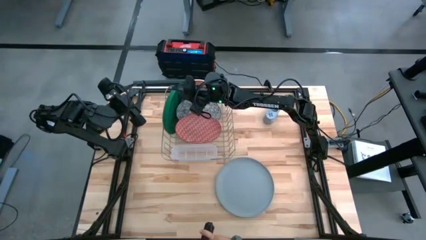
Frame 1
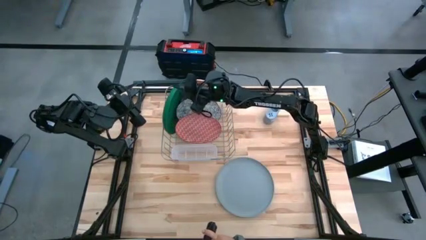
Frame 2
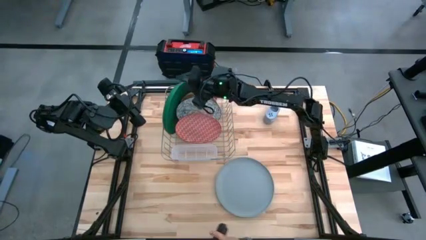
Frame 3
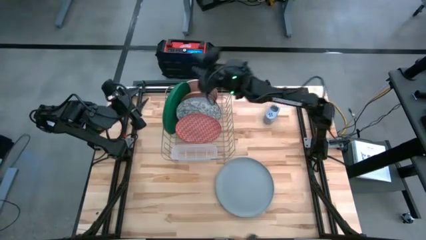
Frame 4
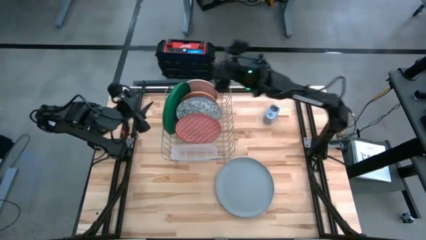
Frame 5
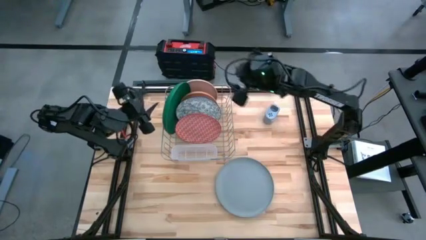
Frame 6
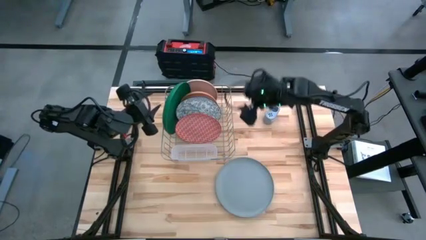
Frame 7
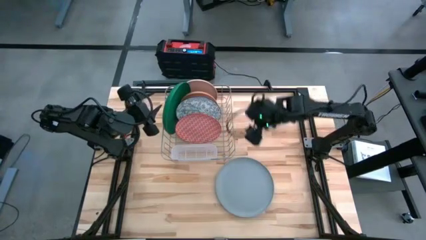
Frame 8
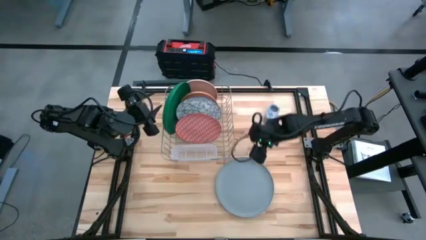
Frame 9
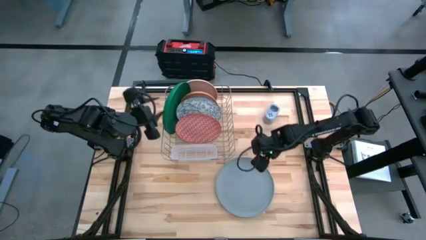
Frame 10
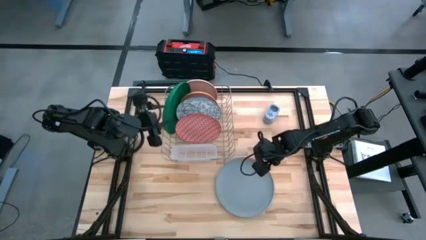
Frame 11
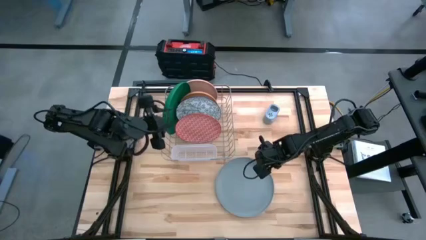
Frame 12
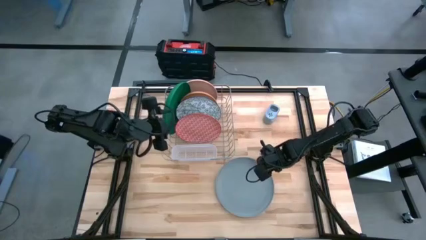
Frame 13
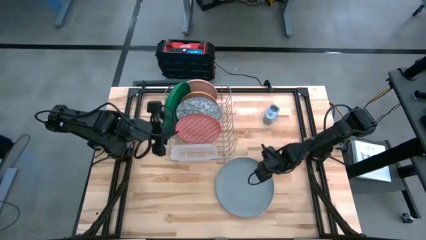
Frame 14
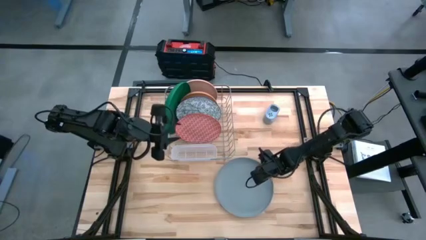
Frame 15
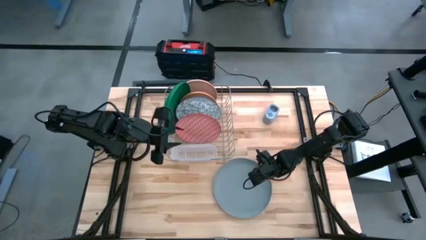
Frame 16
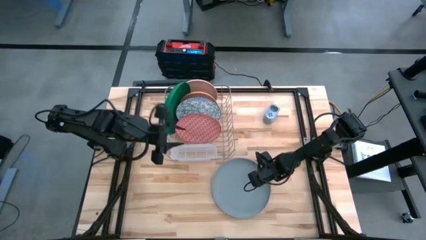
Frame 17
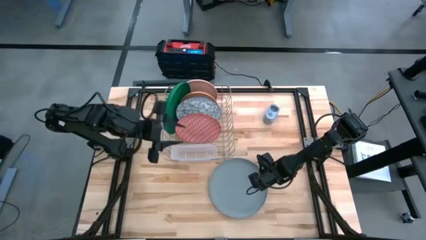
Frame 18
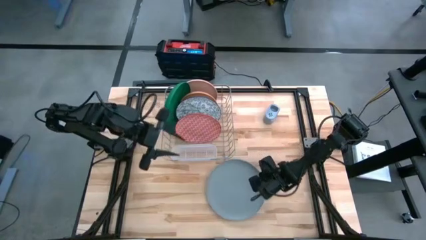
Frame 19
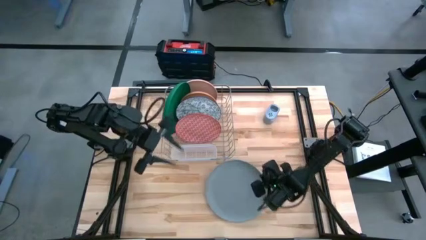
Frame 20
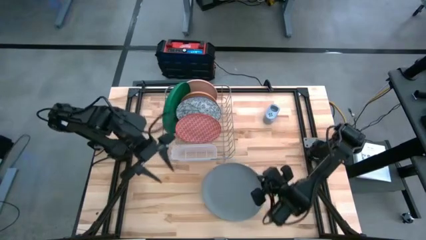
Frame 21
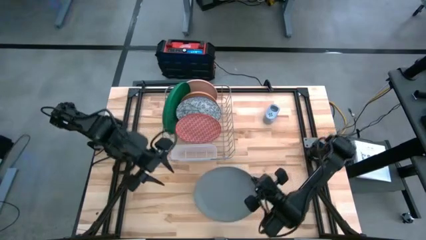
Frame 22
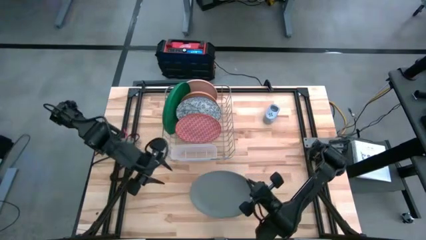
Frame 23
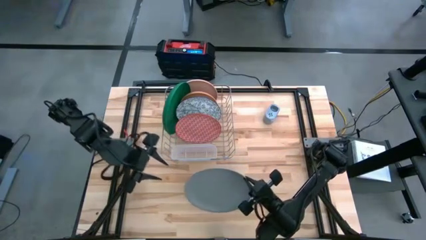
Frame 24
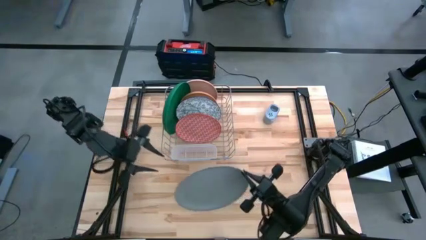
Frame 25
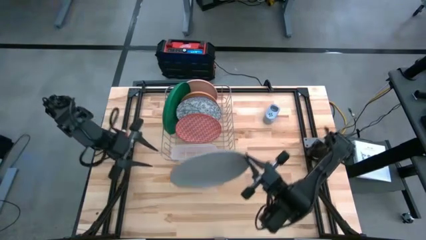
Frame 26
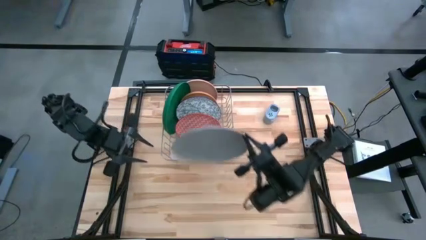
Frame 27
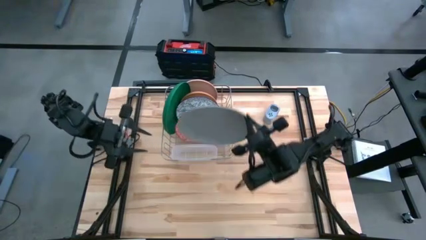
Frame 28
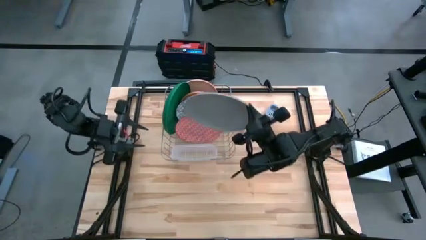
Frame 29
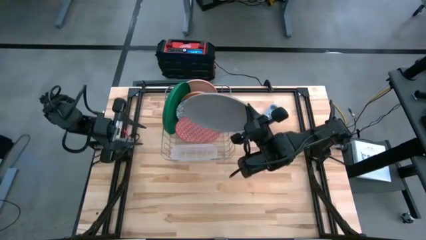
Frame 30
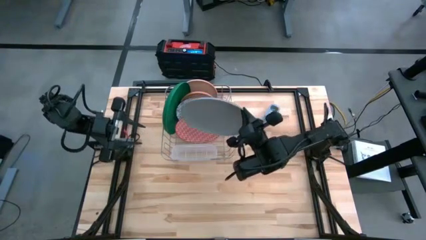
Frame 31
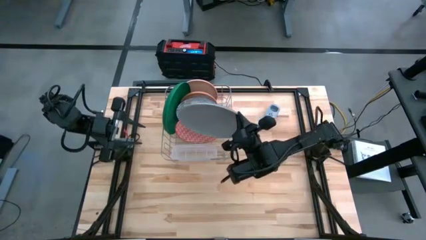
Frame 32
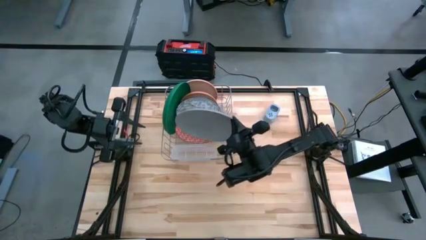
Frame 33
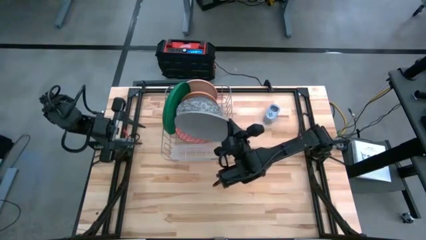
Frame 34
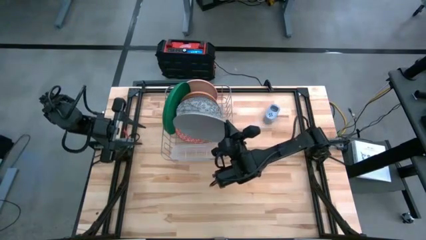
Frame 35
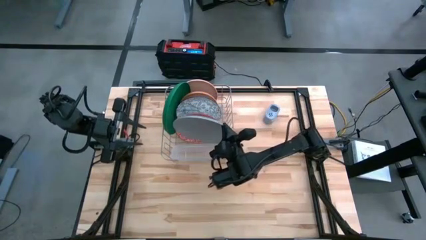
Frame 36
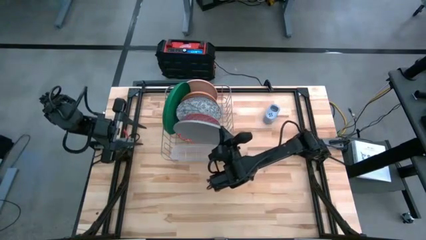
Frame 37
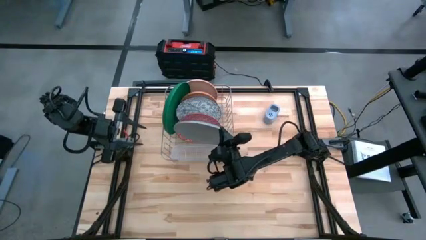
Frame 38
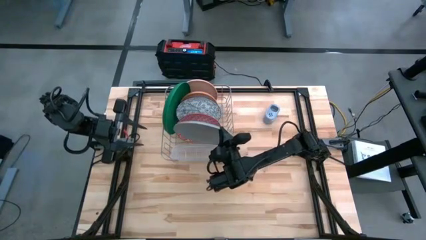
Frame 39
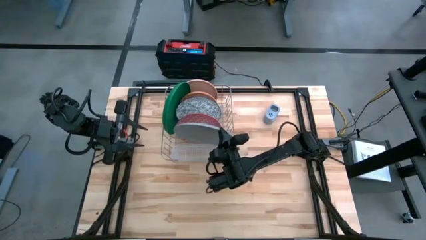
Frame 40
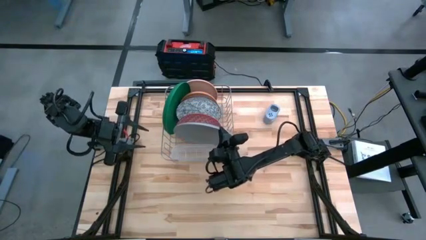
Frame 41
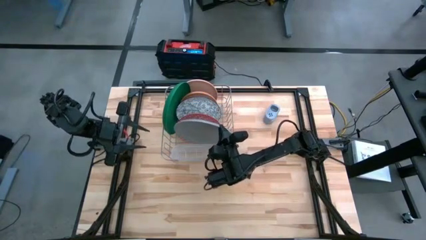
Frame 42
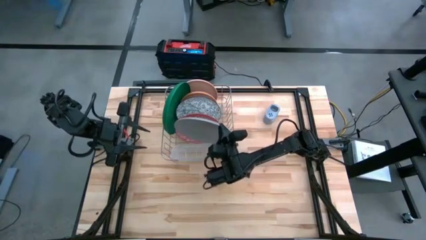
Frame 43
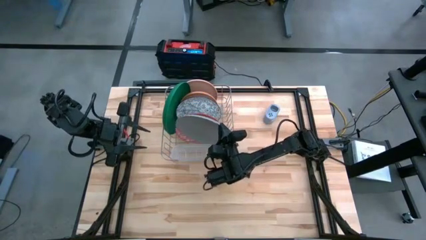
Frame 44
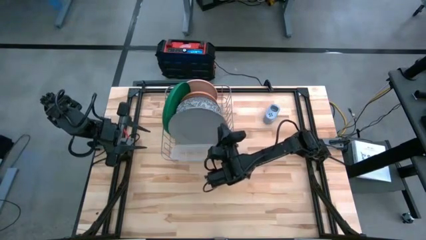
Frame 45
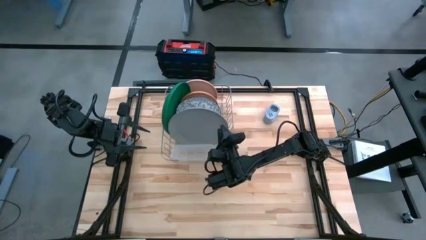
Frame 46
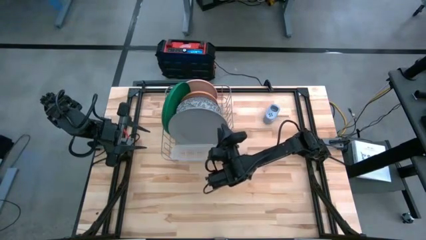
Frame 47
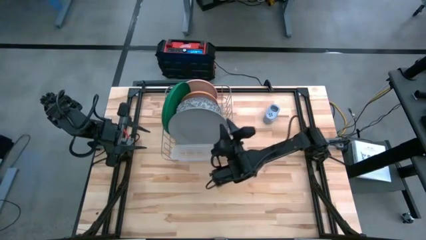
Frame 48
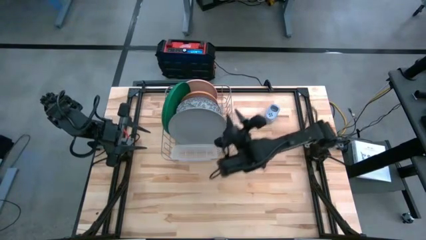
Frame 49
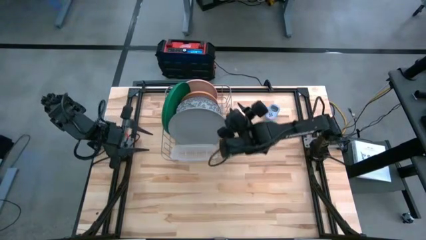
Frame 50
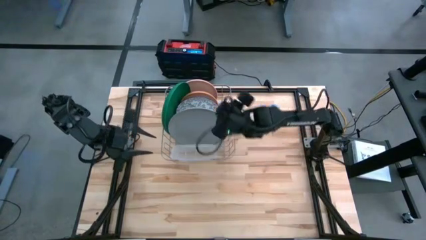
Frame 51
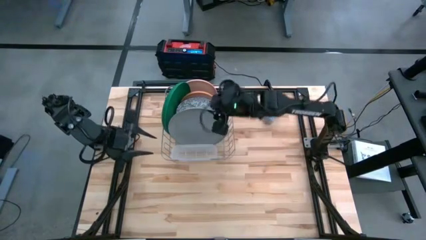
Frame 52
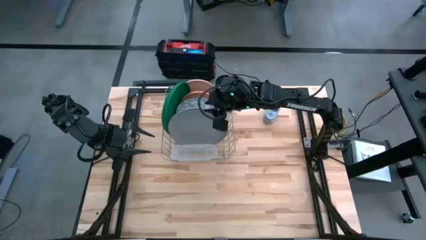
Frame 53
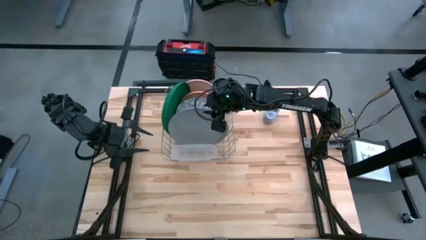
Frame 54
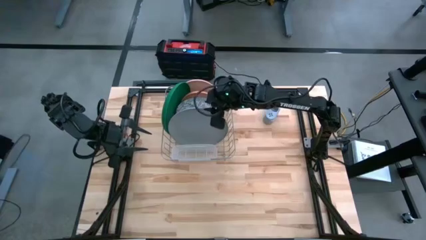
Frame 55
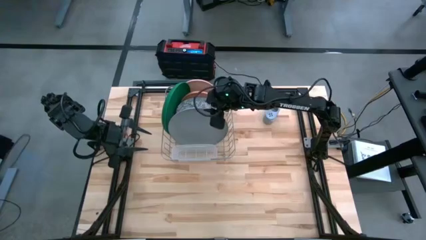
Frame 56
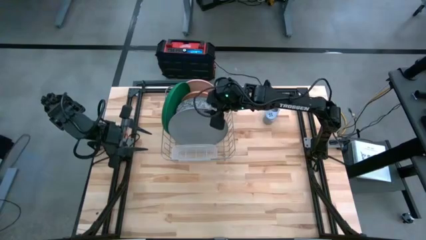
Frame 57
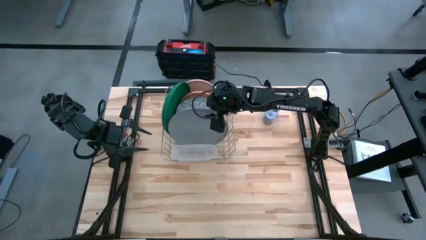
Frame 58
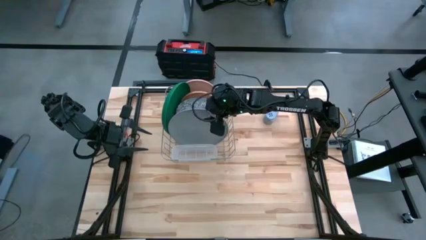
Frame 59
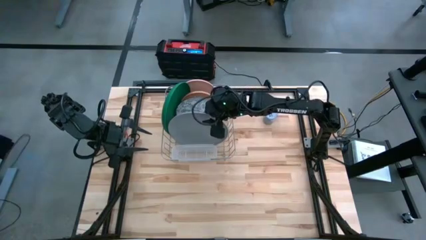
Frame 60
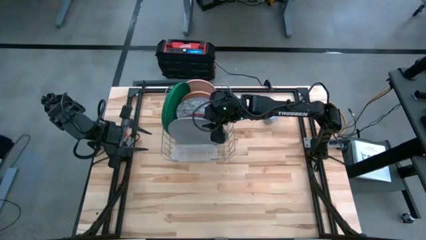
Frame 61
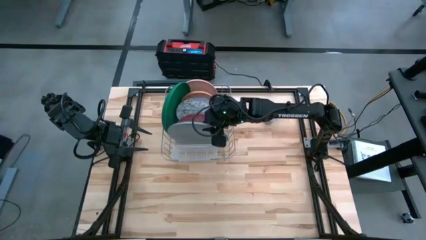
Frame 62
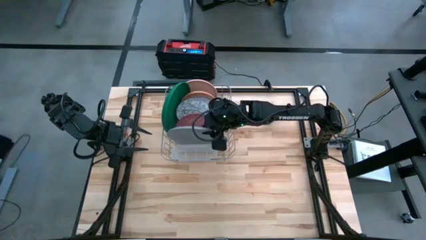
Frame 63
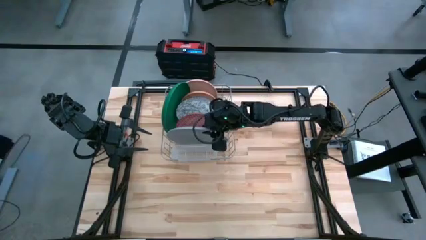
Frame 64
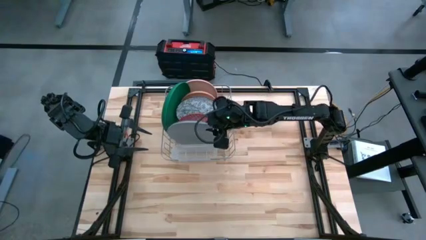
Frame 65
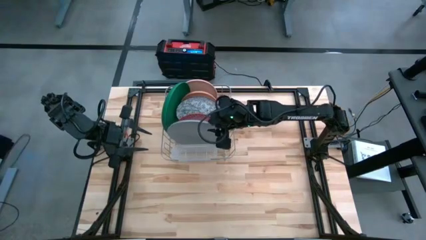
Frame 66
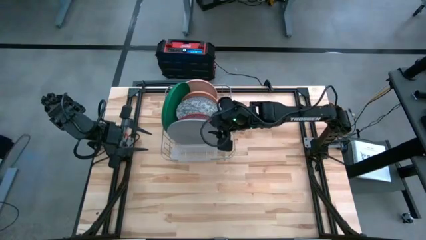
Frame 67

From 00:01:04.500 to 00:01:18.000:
Task: Sort dishes
Put the gray plate in the dish rack

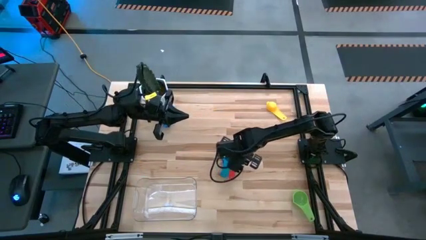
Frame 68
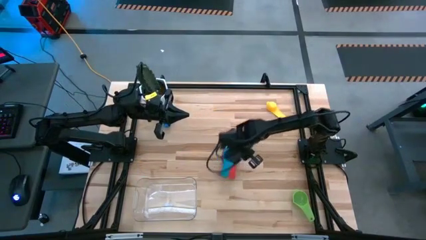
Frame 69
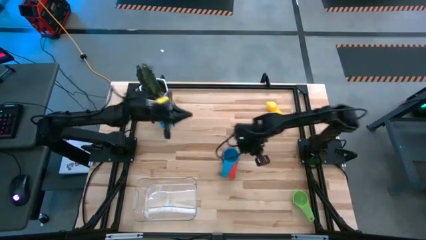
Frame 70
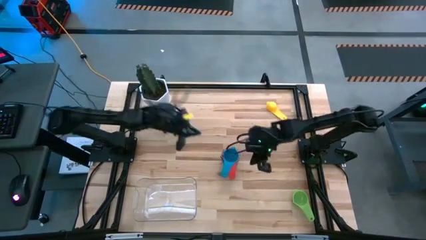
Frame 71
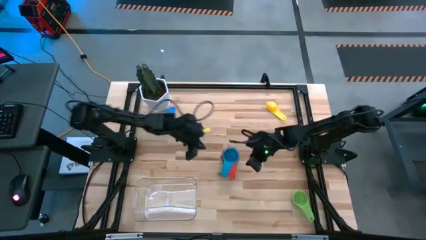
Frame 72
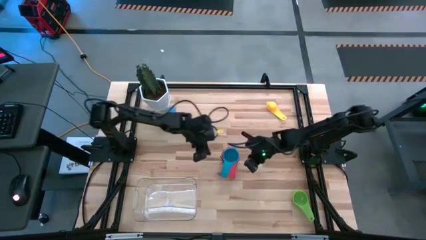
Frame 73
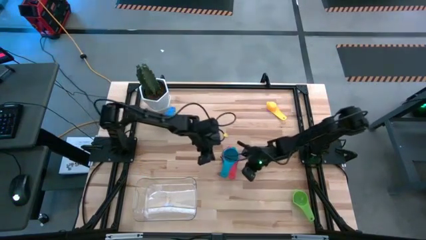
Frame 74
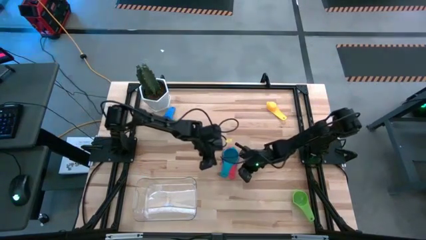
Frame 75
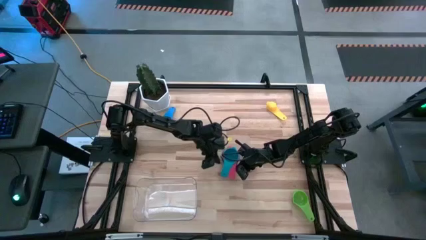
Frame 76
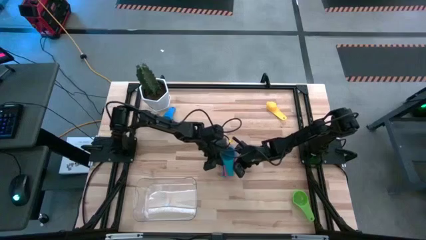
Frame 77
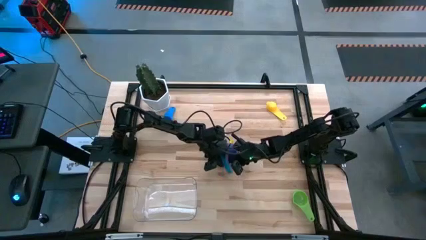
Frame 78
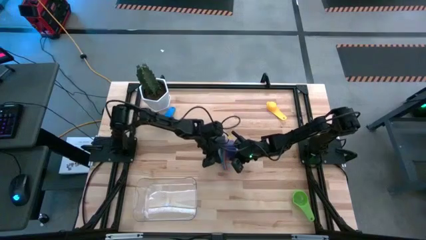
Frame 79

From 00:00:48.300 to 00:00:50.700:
Task: Nest measuring cups in basket
Adjust the nested measuring cups

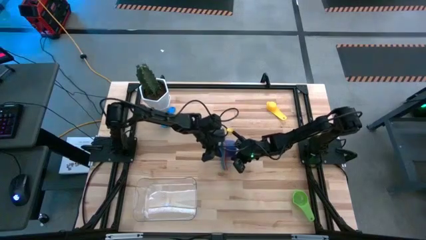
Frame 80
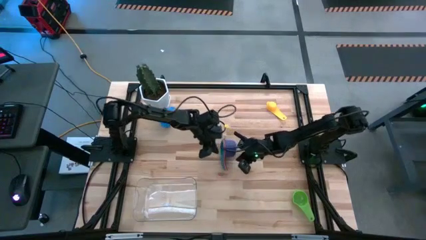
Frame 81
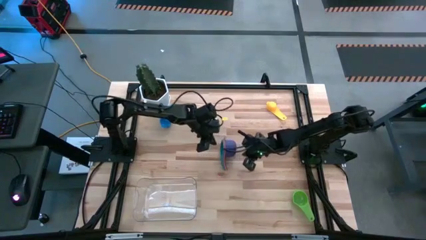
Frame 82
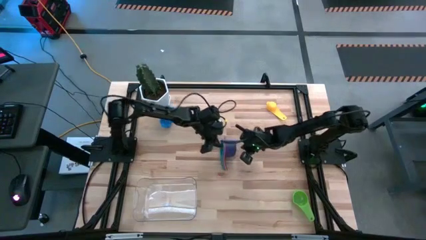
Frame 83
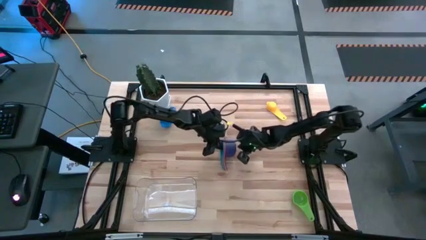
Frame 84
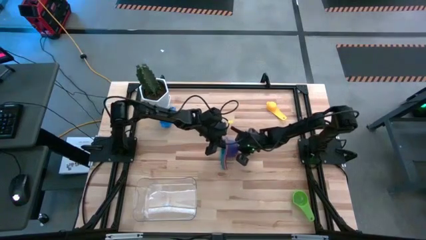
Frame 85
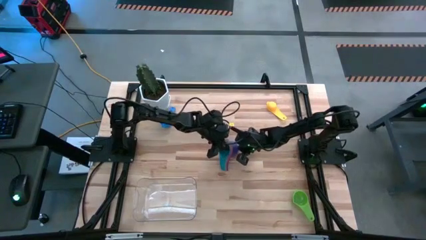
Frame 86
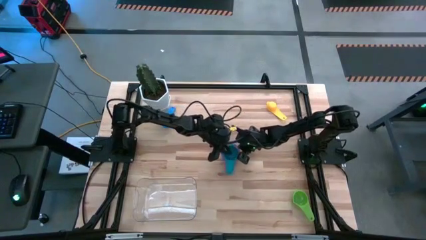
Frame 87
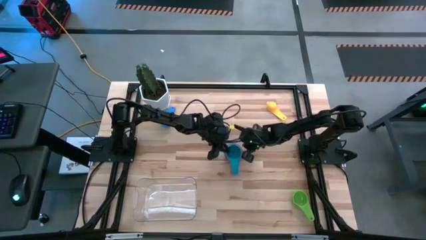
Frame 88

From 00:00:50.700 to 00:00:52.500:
Adjust the nested measuring cups
